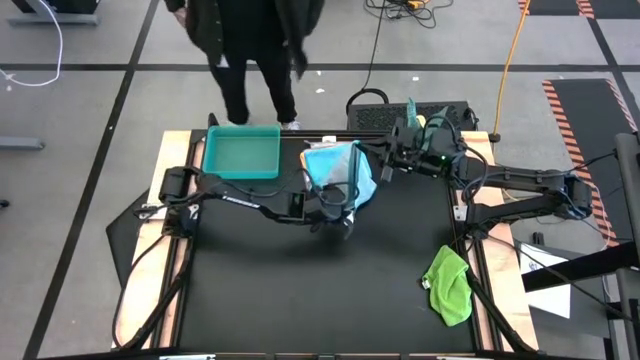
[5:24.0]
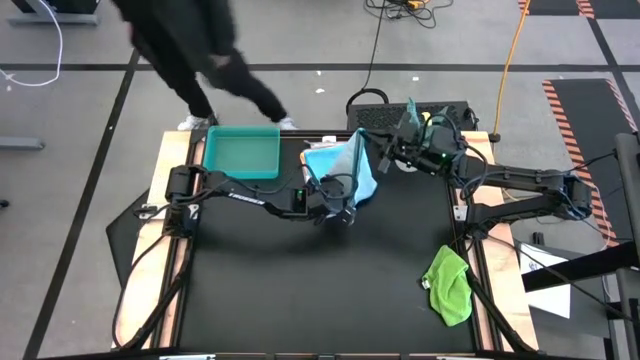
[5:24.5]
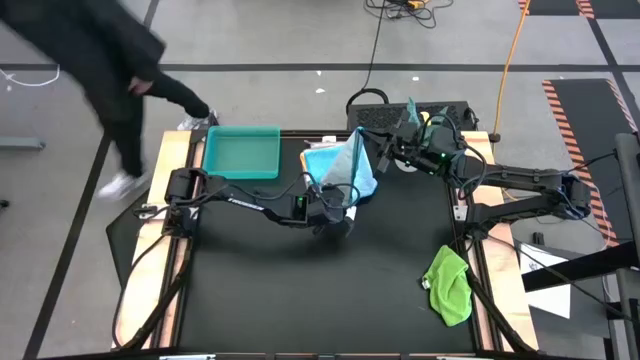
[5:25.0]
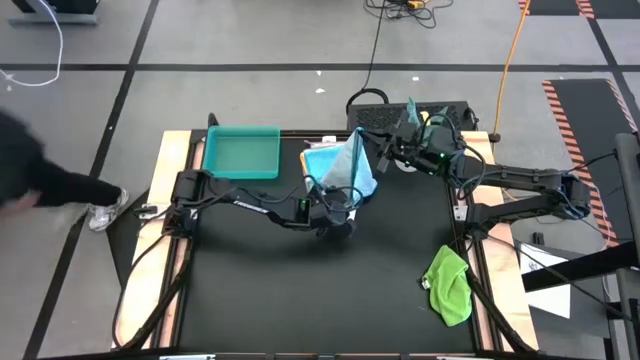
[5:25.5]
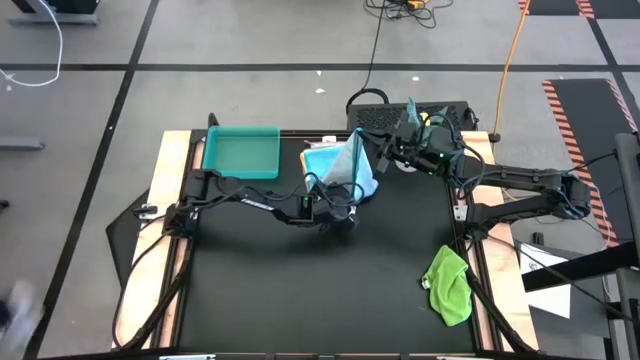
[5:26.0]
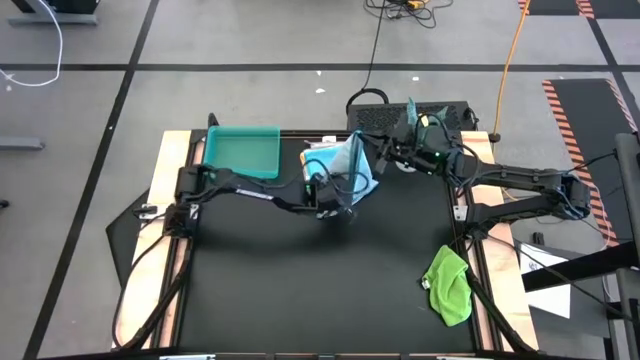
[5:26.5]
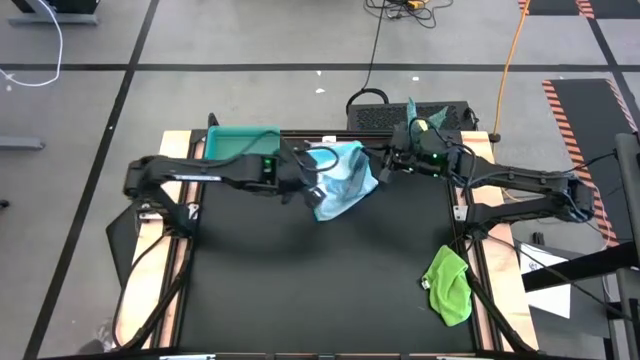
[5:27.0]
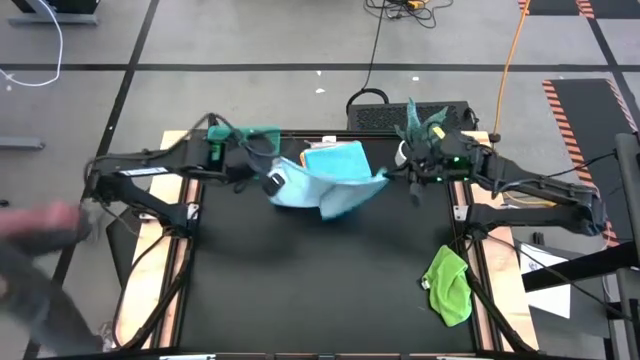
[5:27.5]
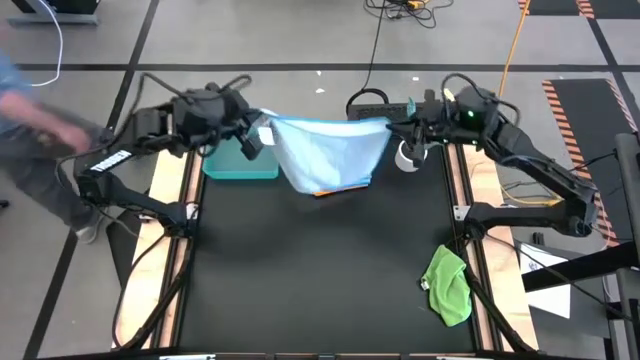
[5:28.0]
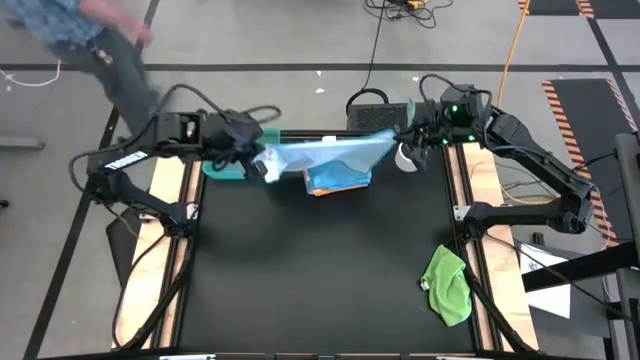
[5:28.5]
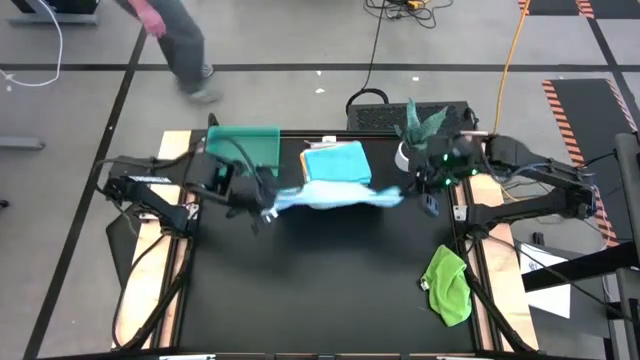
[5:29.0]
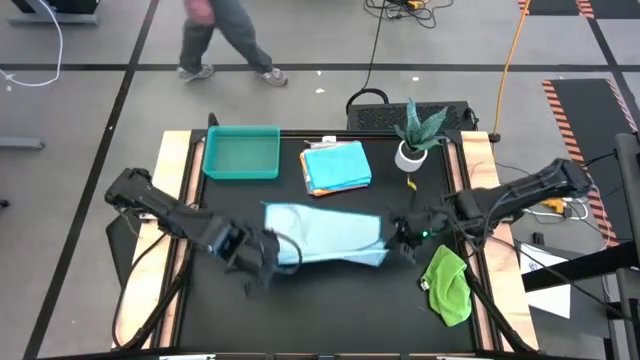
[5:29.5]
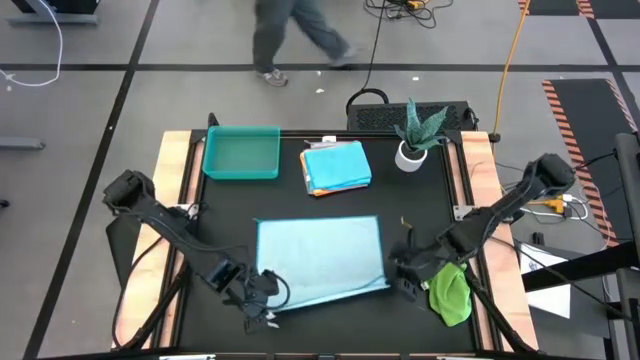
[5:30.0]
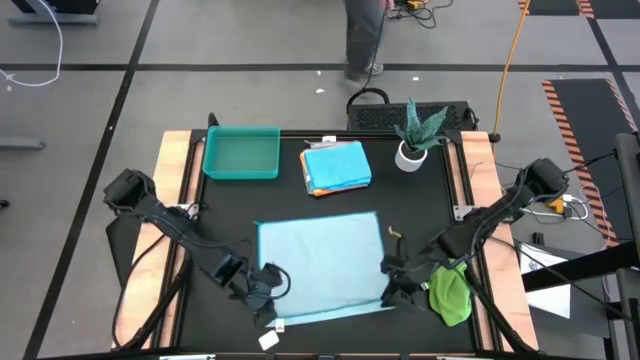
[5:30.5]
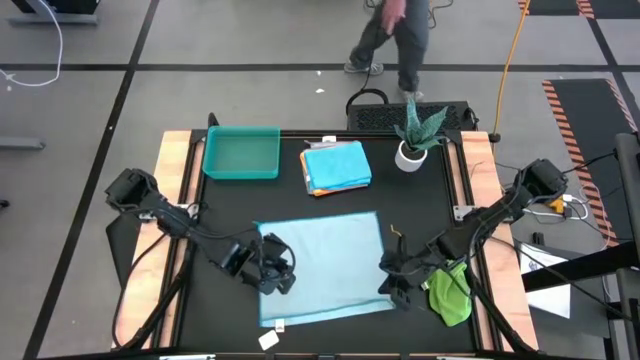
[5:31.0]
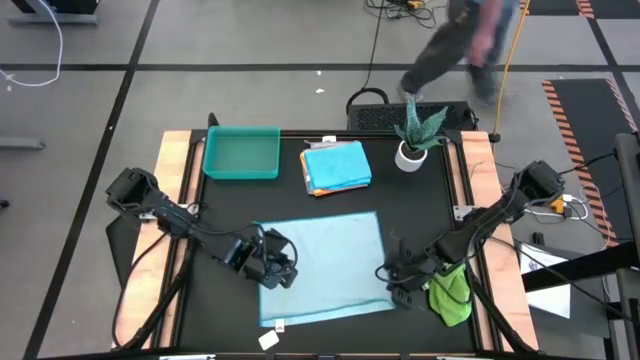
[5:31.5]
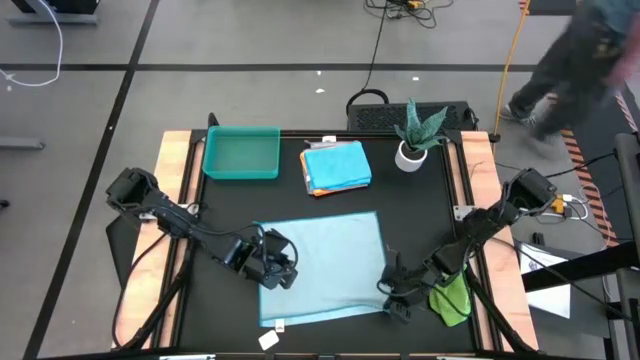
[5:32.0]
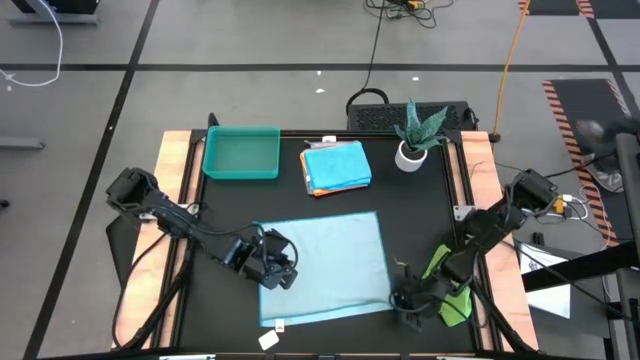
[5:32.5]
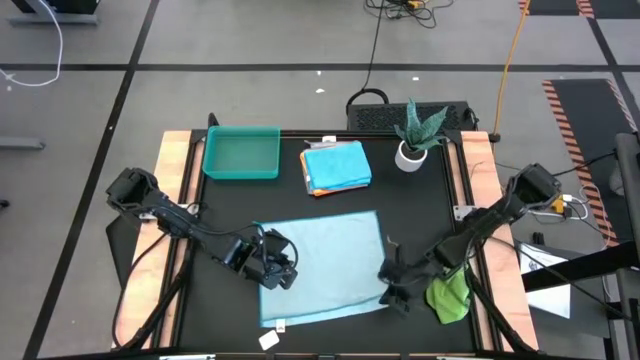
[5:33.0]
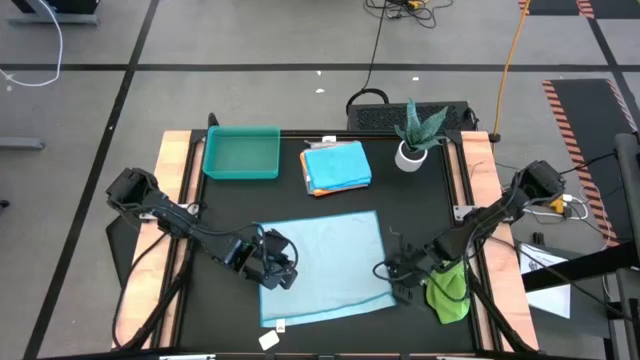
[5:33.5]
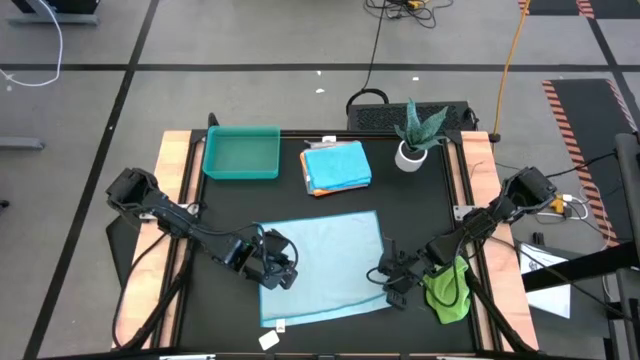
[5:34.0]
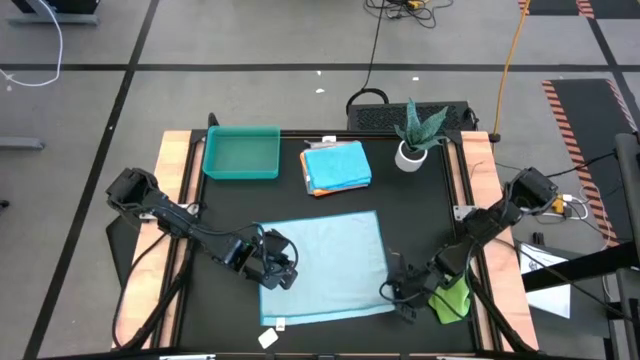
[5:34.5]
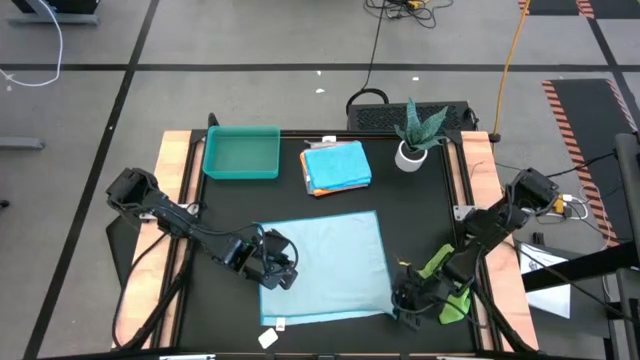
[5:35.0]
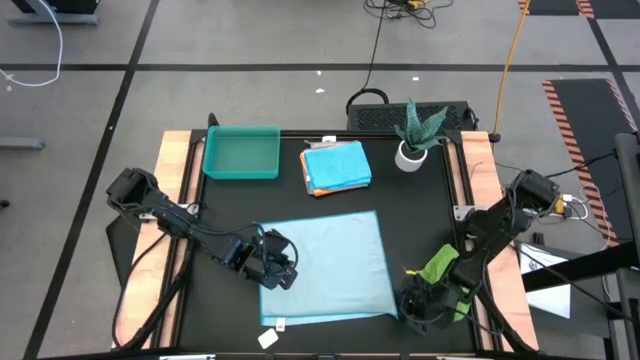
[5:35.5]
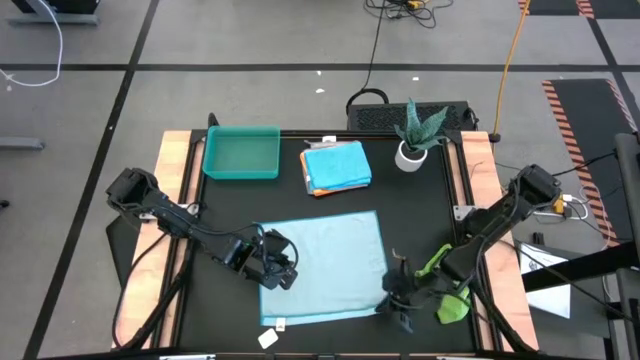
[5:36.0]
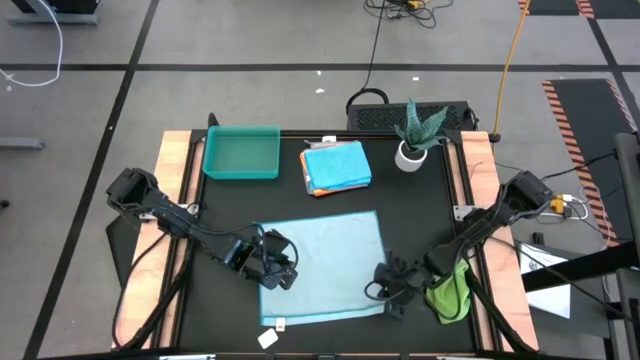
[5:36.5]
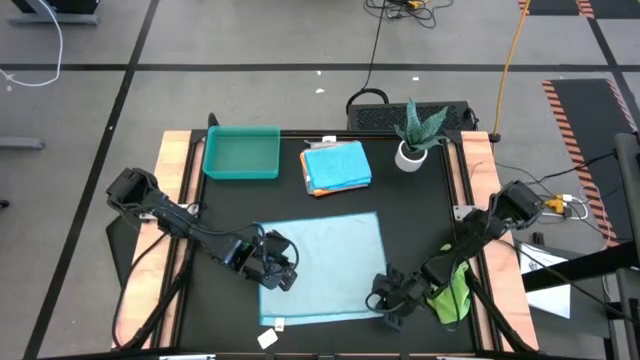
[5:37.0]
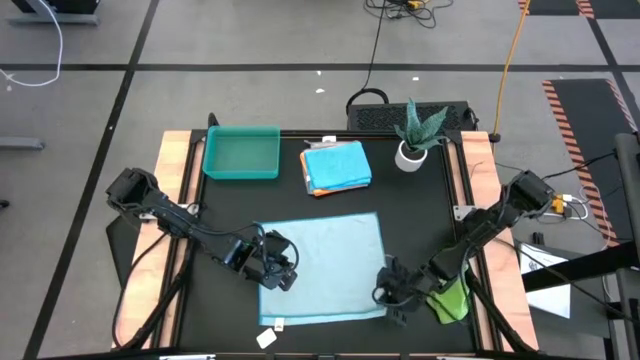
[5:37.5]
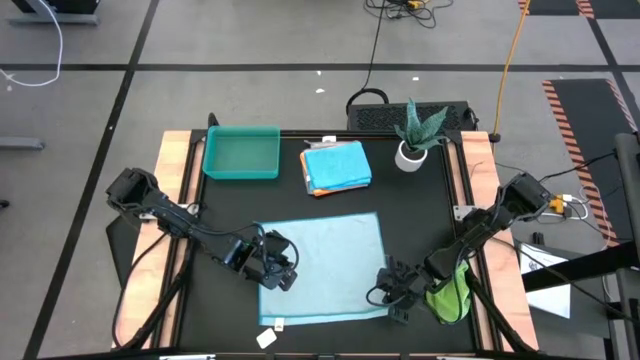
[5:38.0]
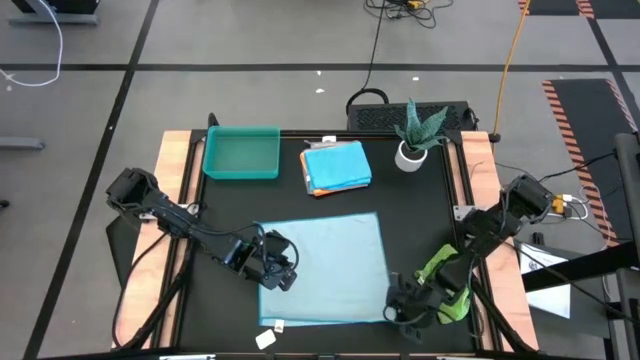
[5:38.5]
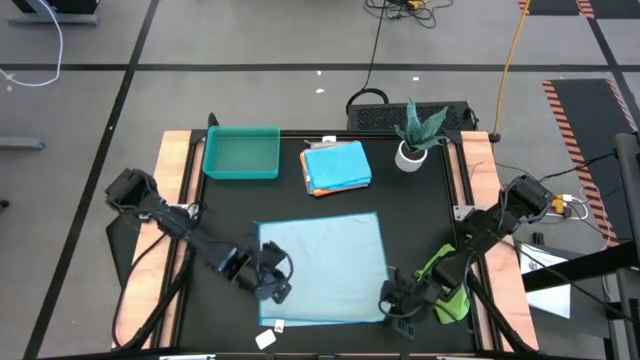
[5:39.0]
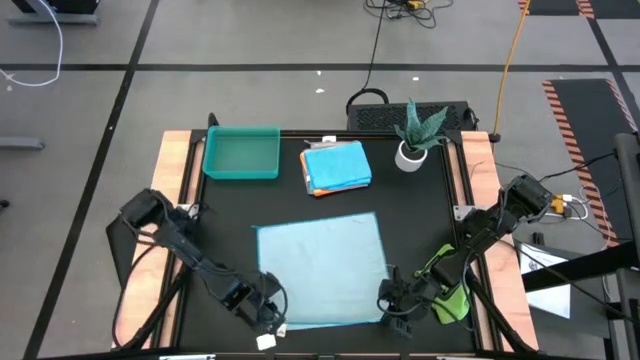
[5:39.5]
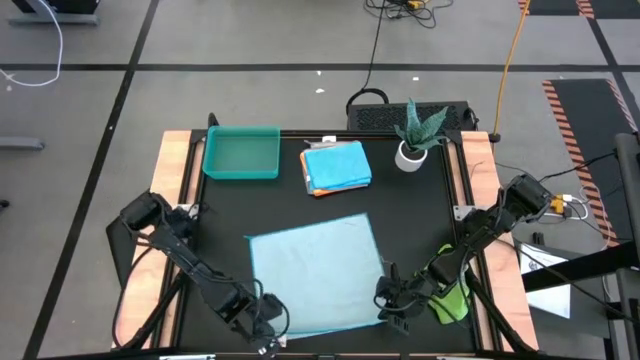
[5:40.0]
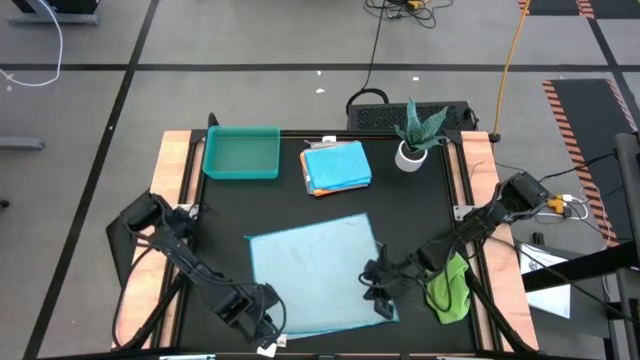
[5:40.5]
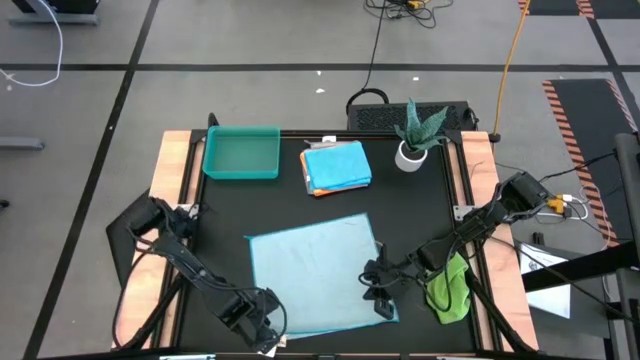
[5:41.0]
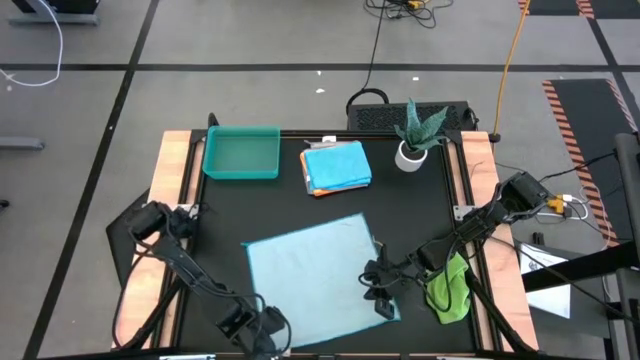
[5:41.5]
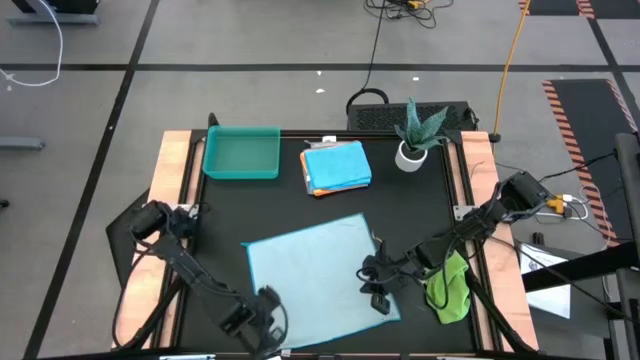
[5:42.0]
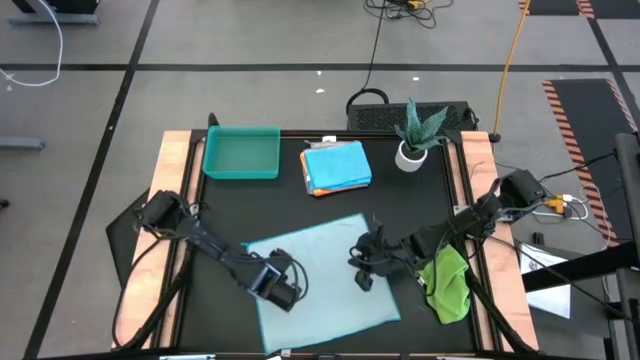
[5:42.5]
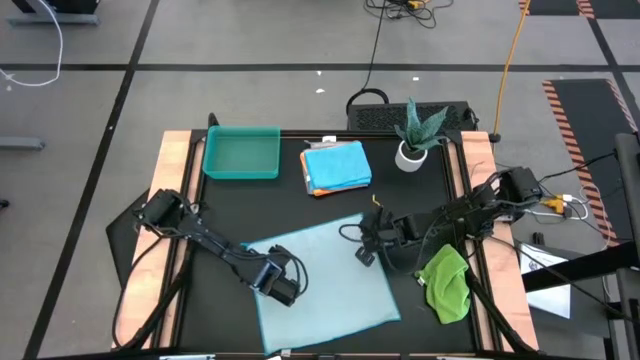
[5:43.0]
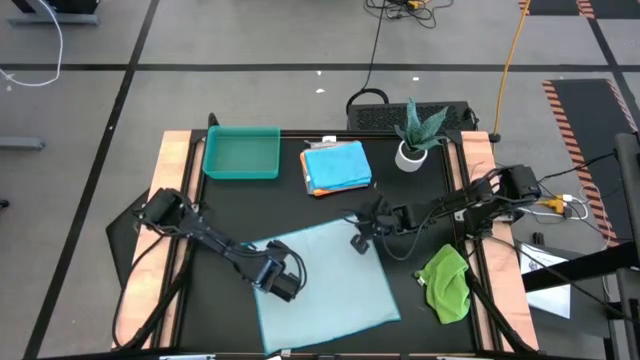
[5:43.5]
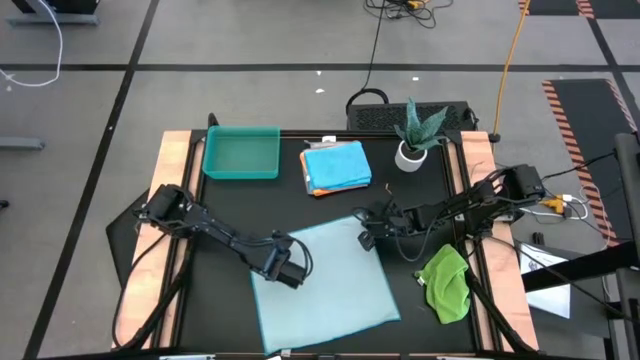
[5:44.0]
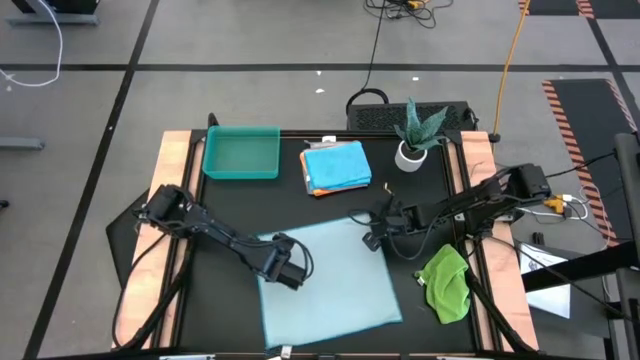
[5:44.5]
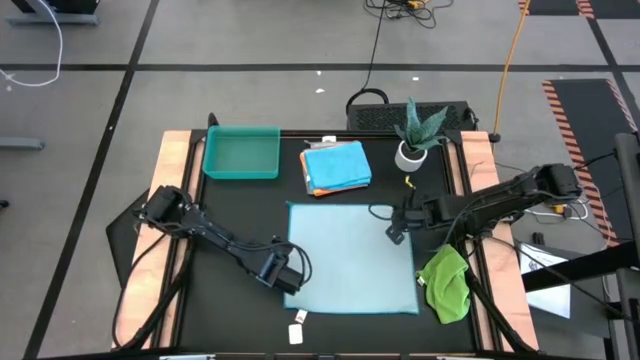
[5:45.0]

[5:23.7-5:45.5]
Task: Fold microfiber towels
Fold the light blue microfiber towel
